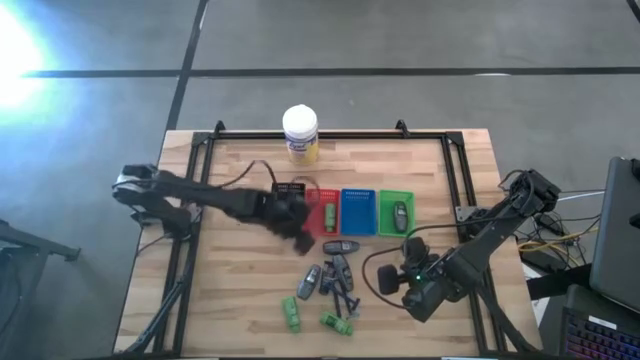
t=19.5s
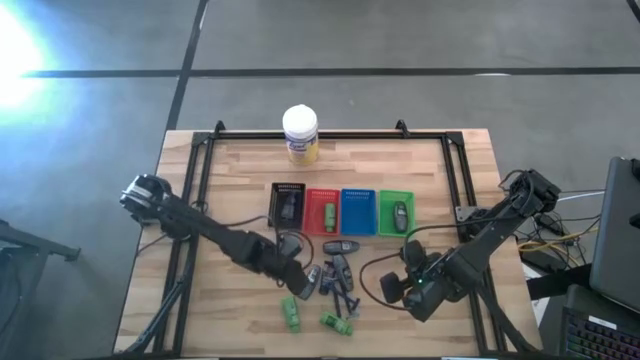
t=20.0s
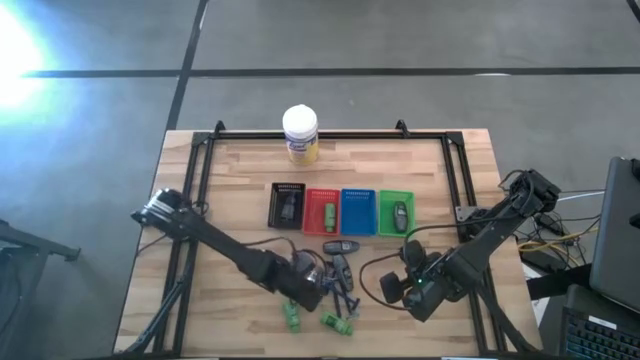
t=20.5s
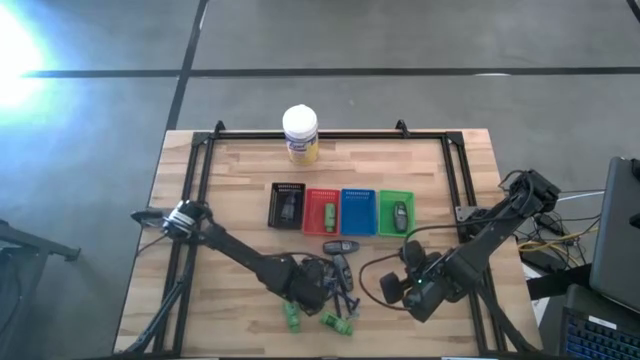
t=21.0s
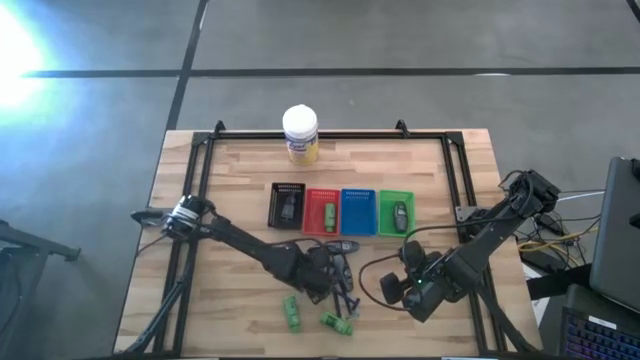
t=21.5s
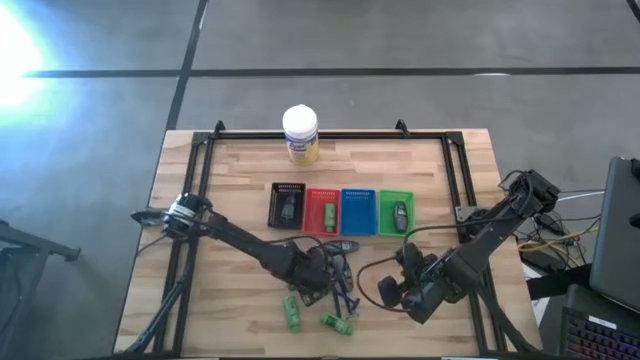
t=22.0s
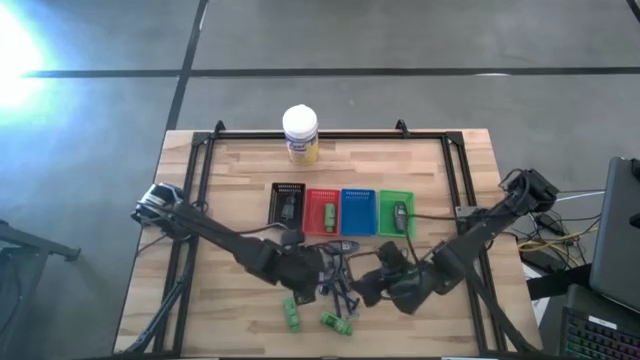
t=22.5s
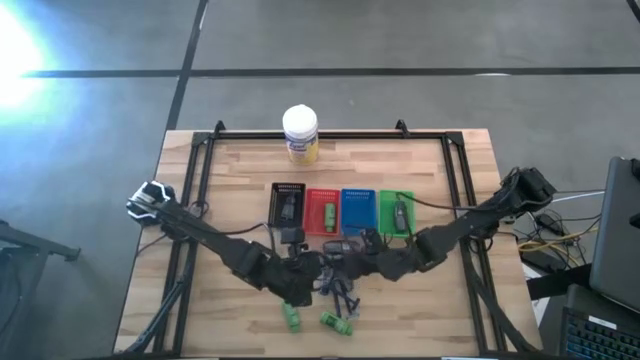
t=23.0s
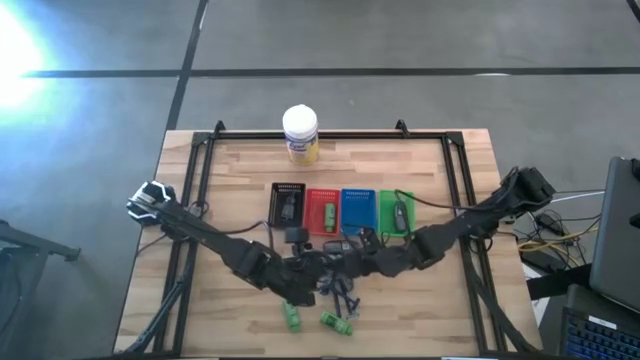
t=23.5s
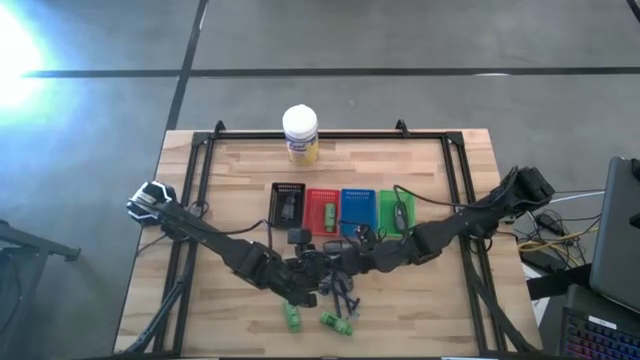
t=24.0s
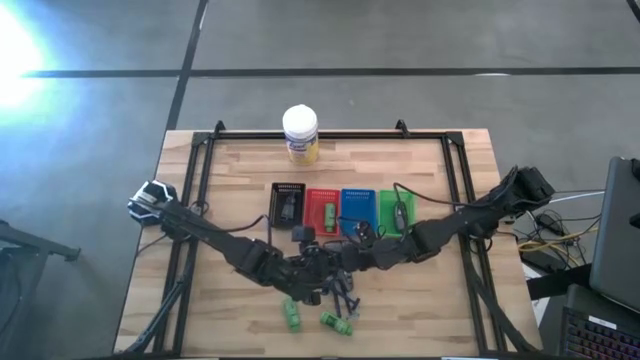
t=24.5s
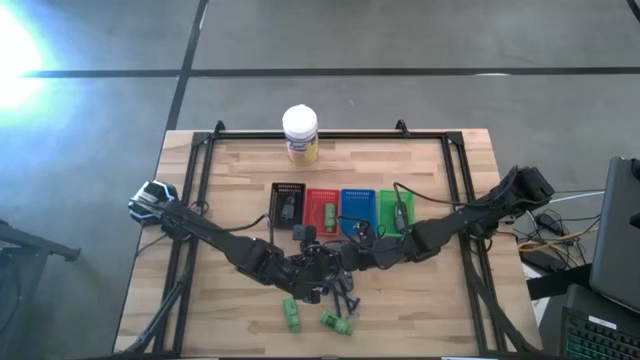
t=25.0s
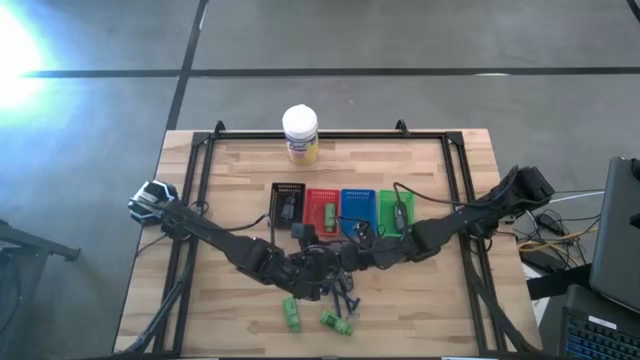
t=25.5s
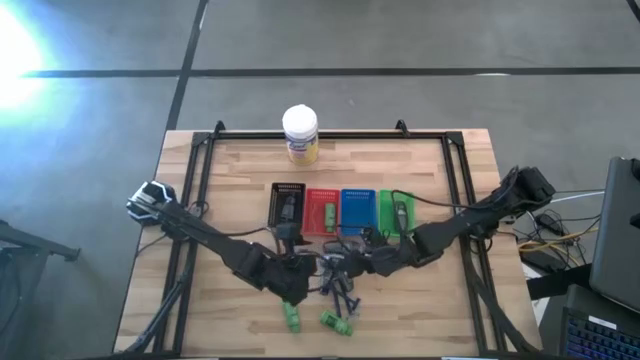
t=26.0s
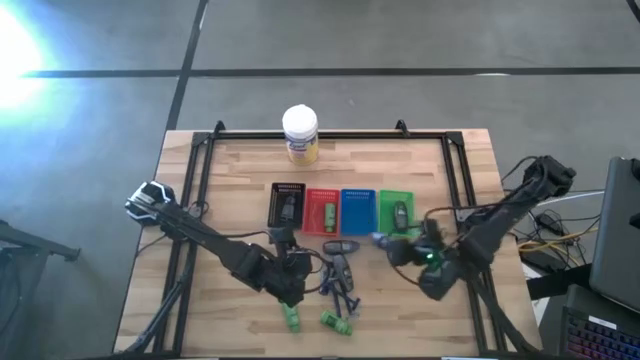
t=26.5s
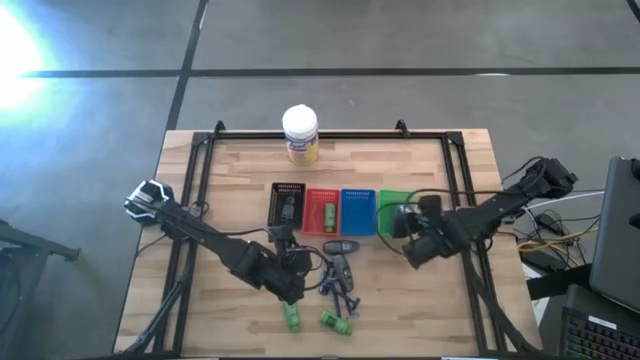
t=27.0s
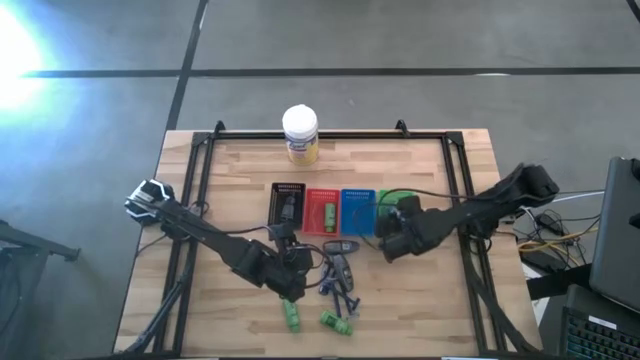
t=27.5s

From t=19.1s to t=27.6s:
Task: Pick & Place Travel size toiletries
Put the gray deodorant into the green basket

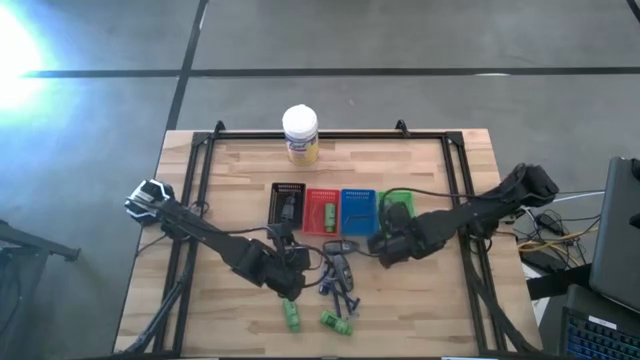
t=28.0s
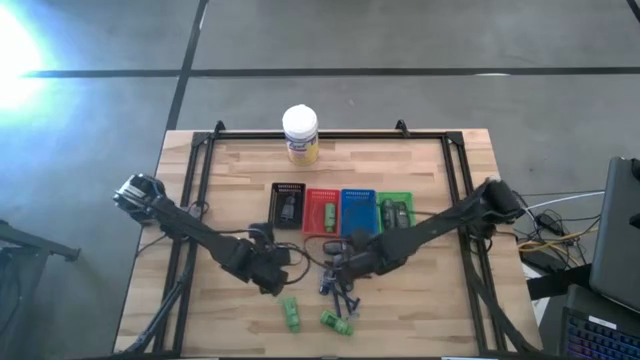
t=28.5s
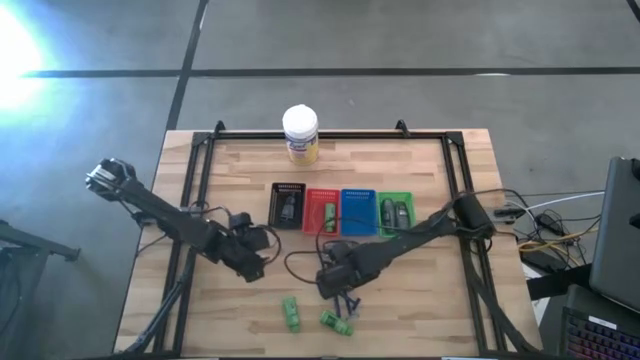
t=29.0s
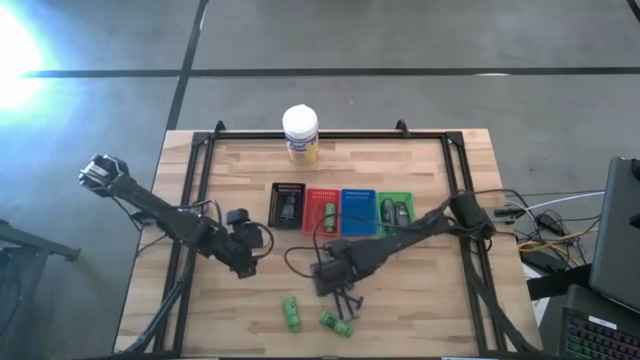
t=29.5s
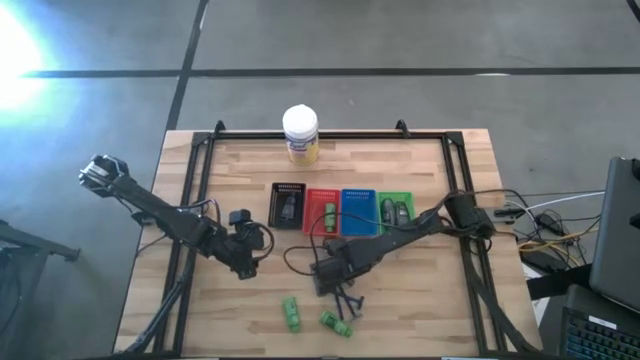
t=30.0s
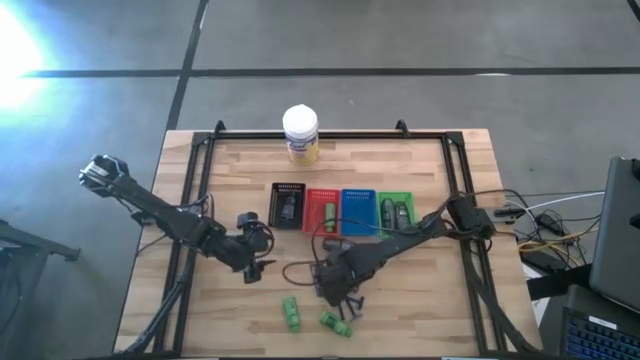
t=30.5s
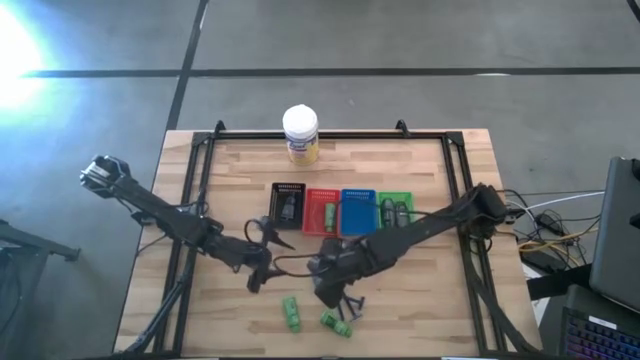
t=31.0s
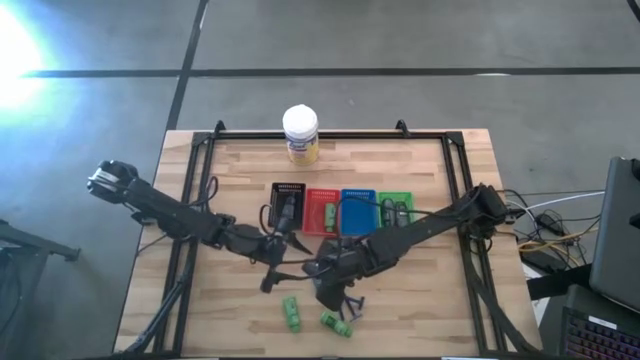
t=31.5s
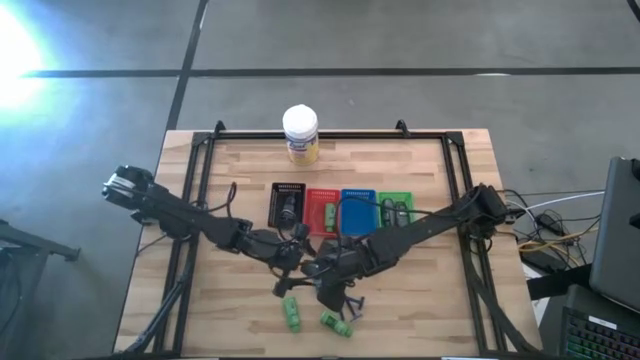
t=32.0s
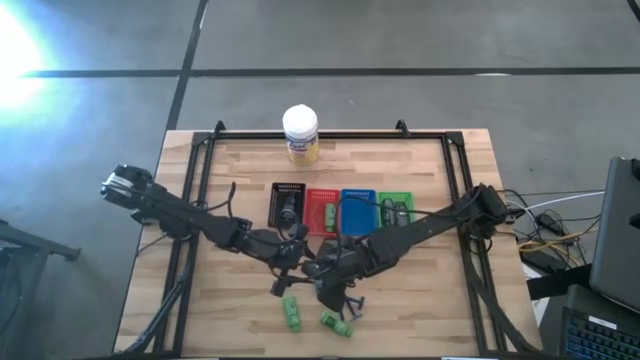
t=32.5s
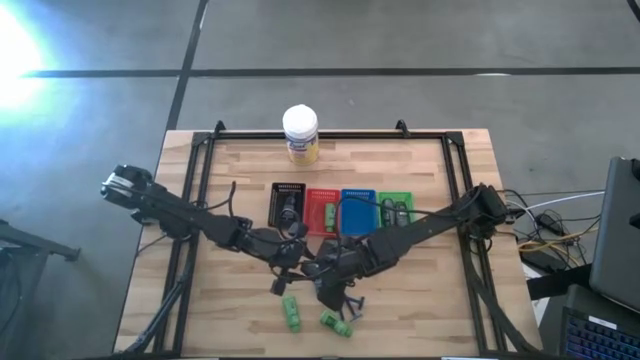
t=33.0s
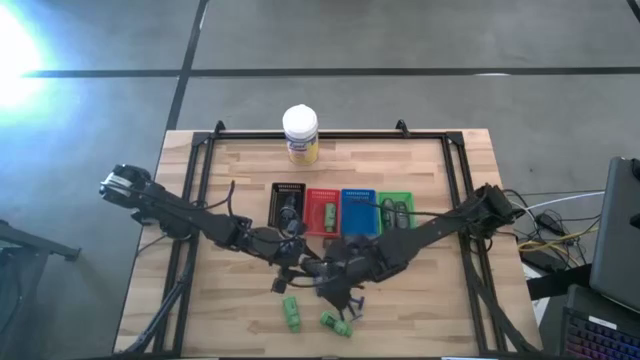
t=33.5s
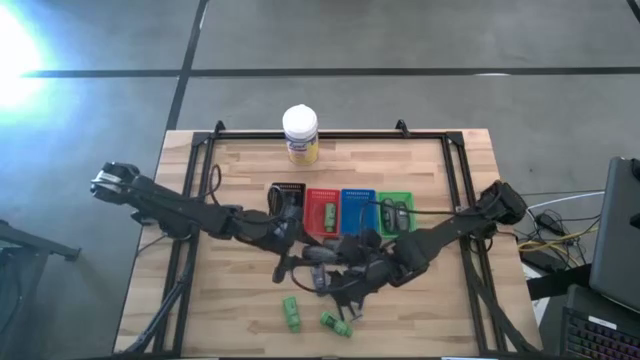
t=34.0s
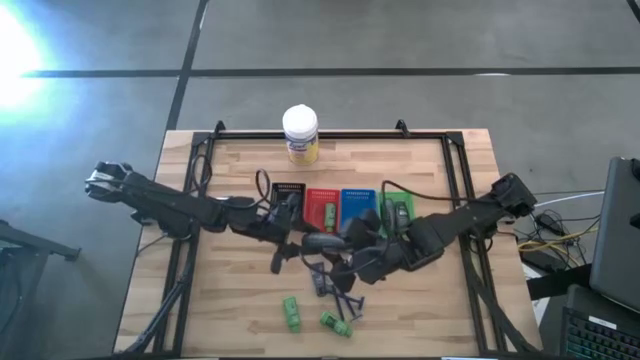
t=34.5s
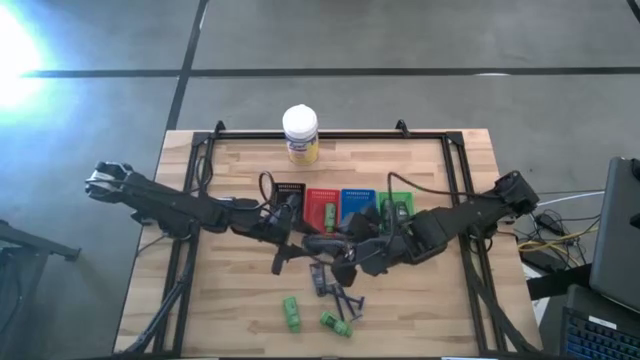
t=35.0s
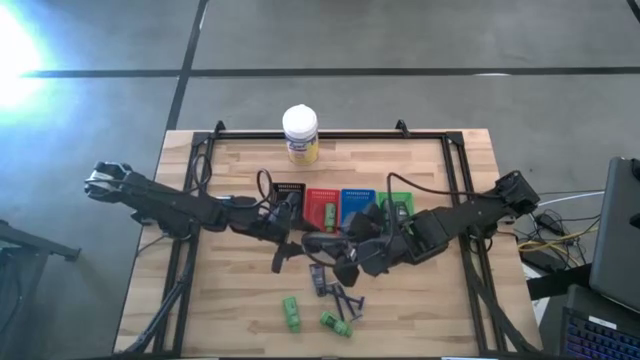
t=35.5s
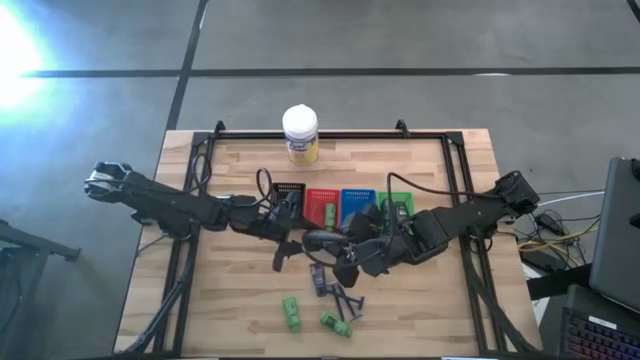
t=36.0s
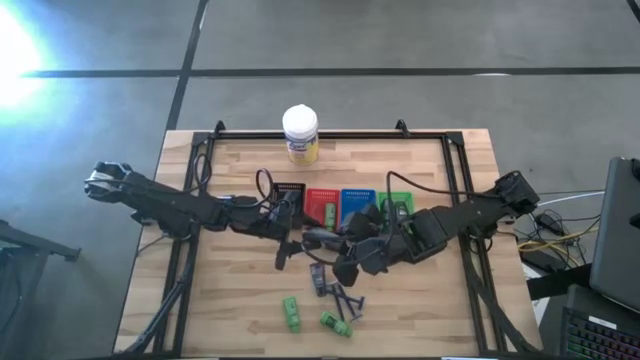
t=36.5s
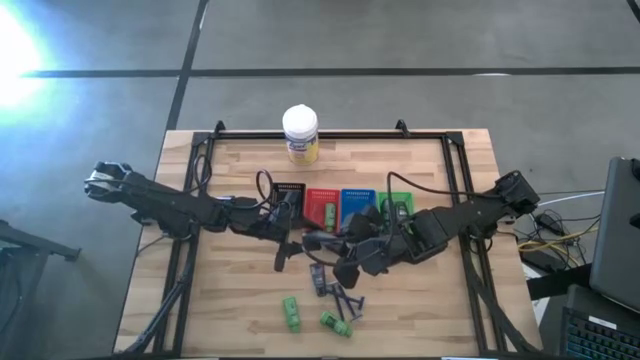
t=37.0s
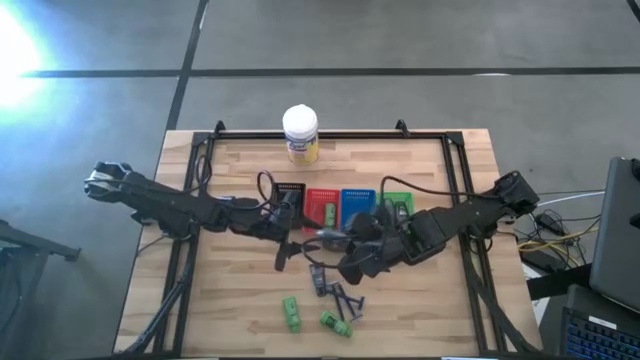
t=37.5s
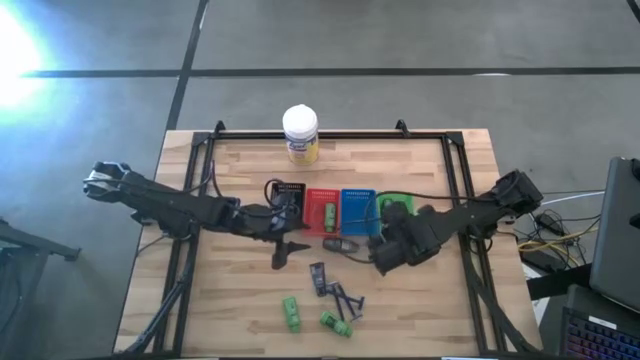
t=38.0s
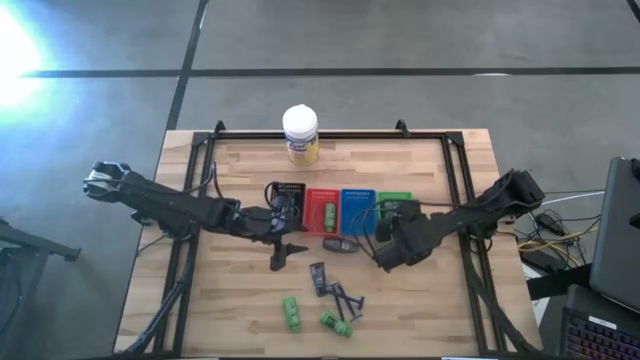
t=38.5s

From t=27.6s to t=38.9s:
Put the gray deodorant into the green basket

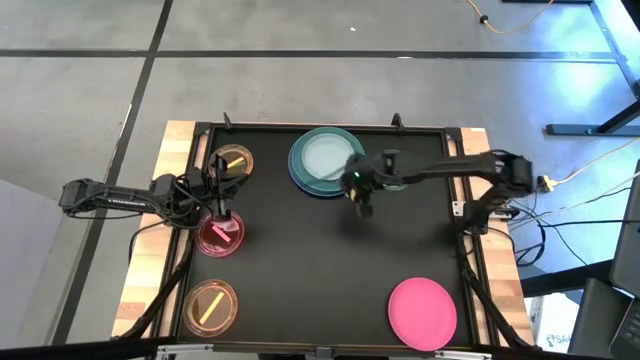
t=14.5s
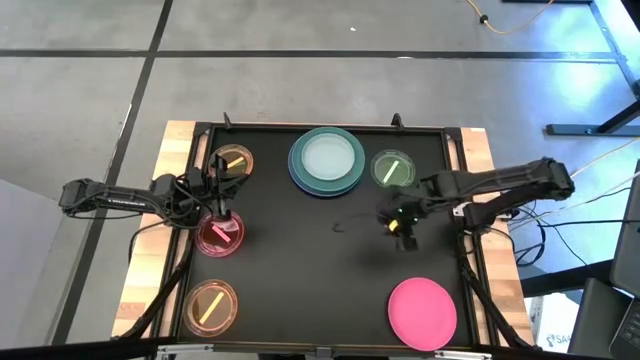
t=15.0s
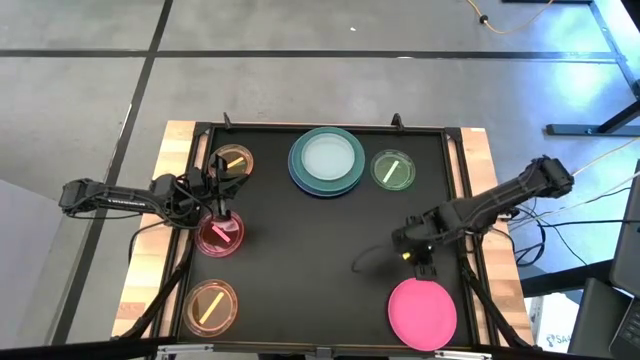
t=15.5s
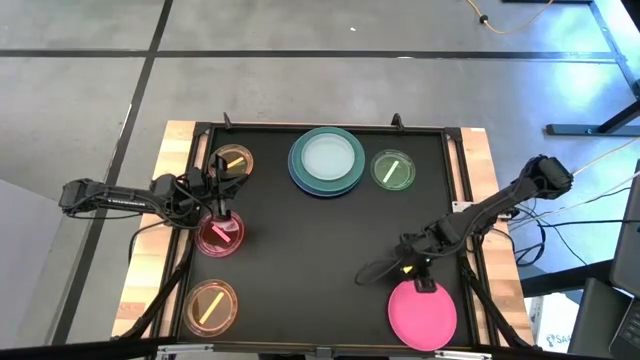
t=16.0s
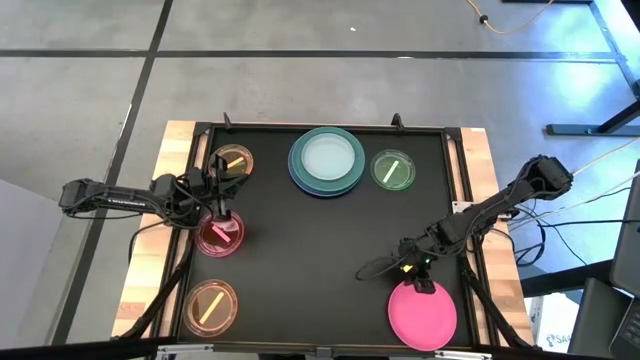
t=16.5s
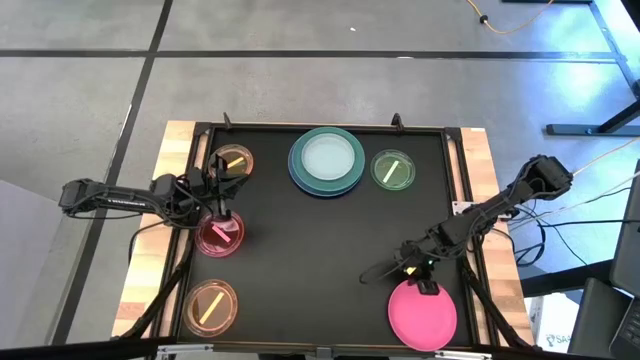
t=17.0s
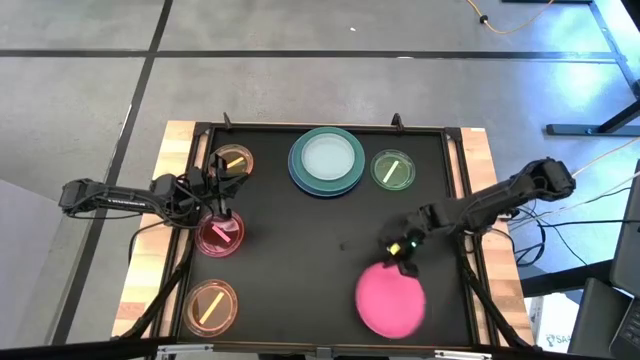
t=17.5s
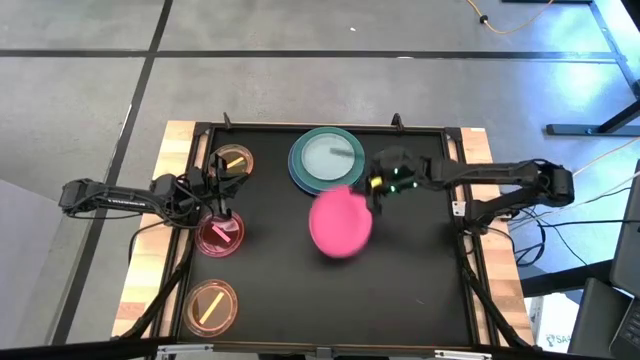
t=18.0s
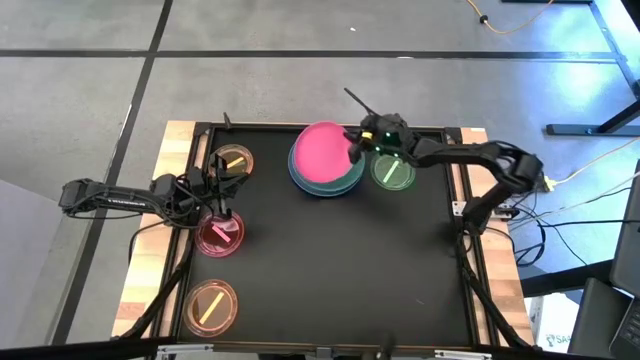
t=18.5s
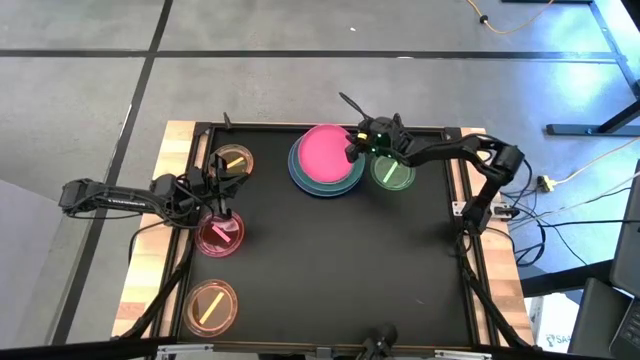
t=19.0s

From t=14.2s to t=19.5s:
Task: Stack plastic plates
Stack the pink plate on top of the gray plate
